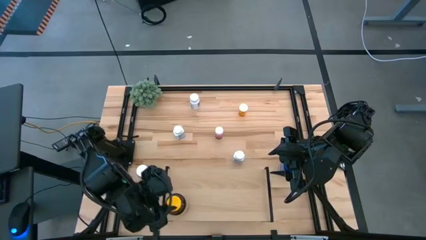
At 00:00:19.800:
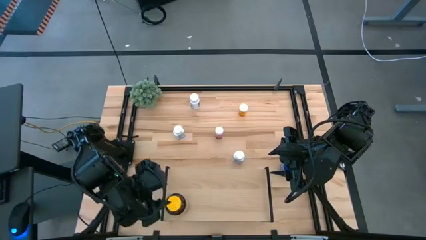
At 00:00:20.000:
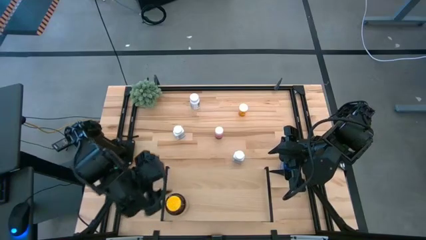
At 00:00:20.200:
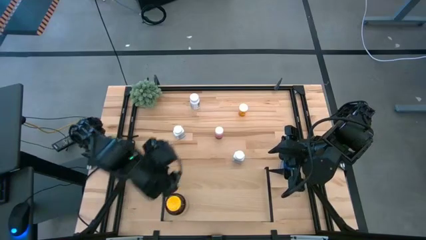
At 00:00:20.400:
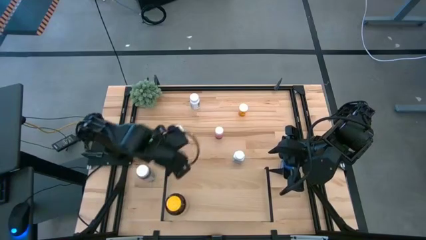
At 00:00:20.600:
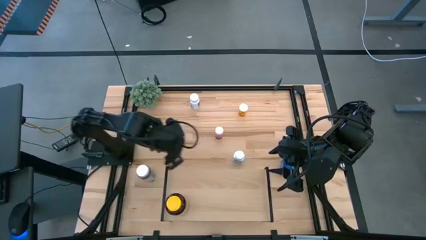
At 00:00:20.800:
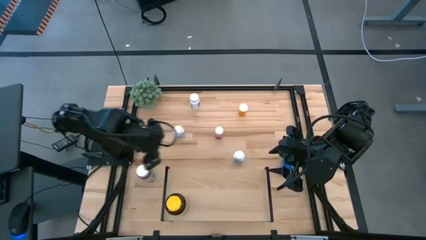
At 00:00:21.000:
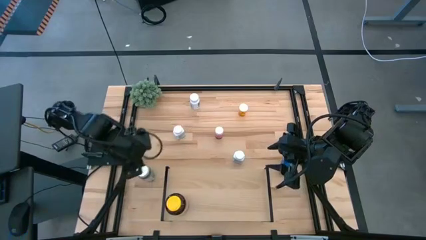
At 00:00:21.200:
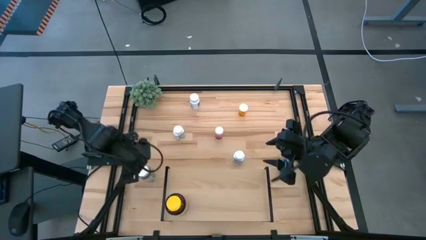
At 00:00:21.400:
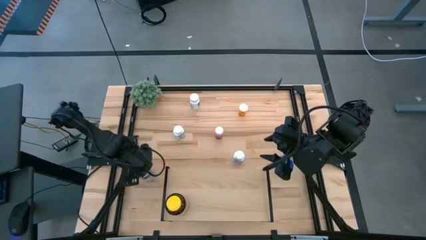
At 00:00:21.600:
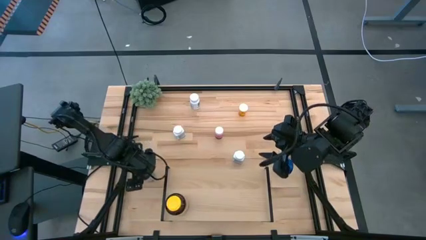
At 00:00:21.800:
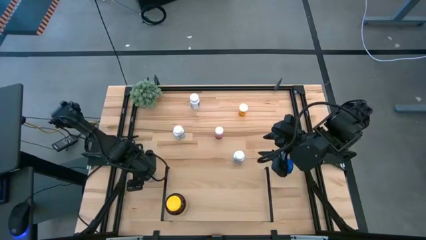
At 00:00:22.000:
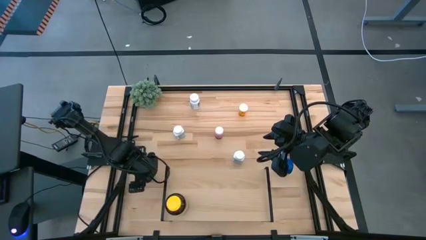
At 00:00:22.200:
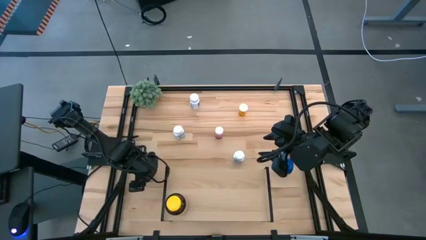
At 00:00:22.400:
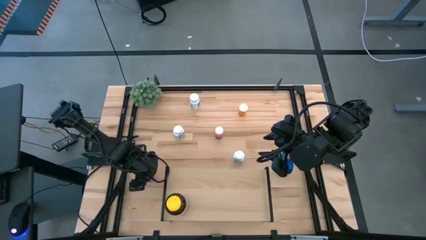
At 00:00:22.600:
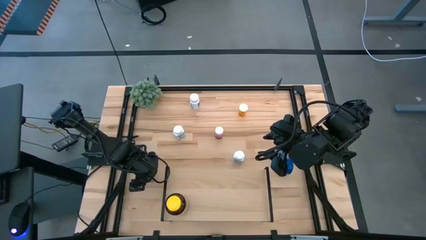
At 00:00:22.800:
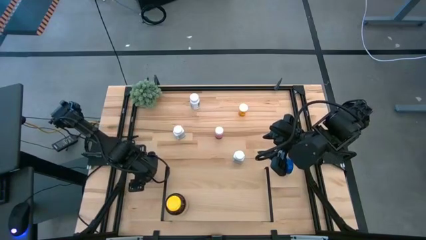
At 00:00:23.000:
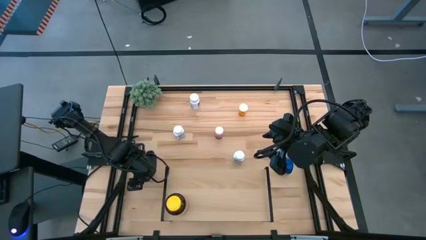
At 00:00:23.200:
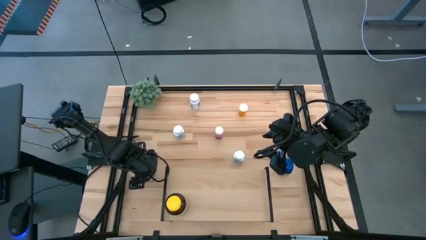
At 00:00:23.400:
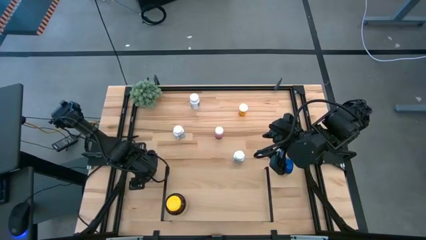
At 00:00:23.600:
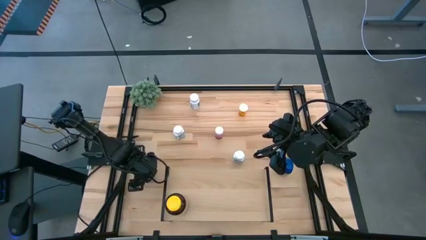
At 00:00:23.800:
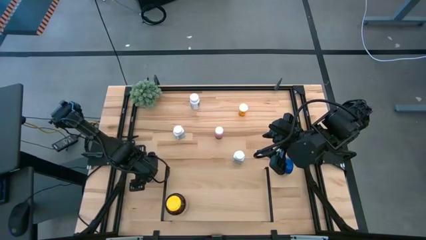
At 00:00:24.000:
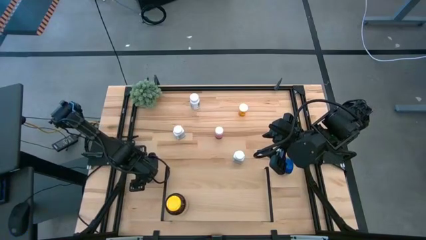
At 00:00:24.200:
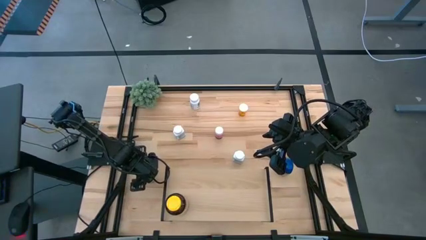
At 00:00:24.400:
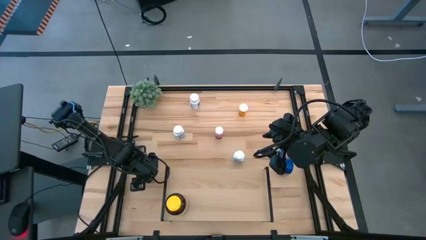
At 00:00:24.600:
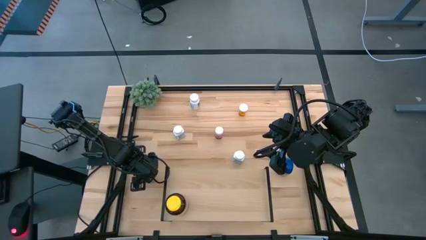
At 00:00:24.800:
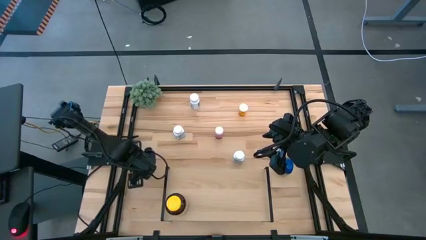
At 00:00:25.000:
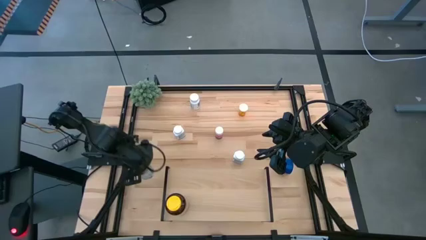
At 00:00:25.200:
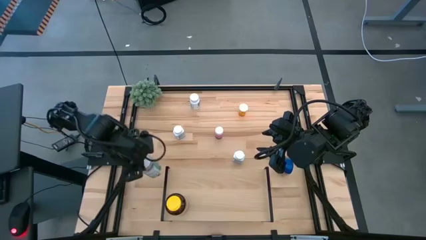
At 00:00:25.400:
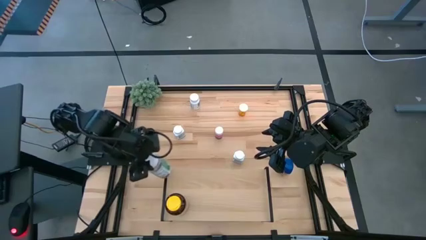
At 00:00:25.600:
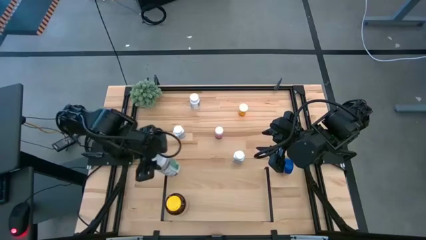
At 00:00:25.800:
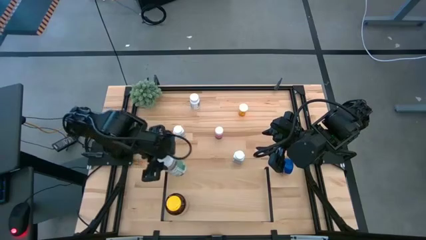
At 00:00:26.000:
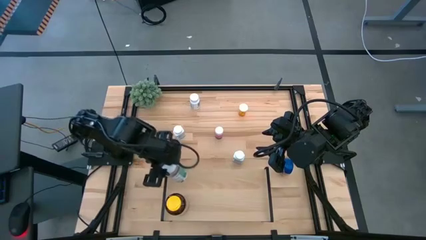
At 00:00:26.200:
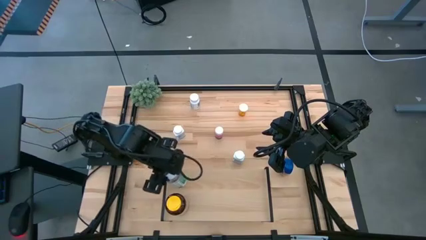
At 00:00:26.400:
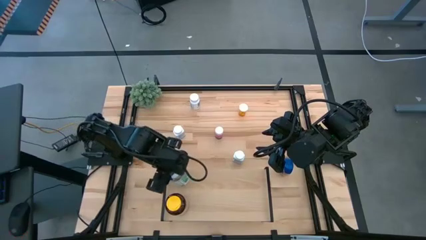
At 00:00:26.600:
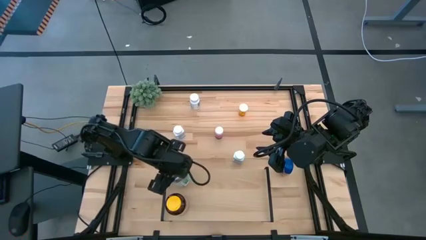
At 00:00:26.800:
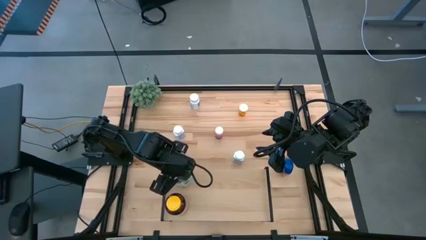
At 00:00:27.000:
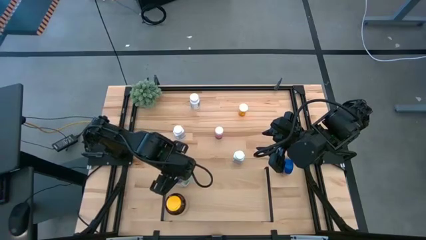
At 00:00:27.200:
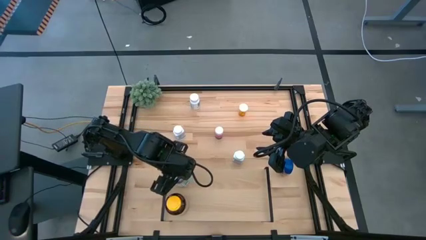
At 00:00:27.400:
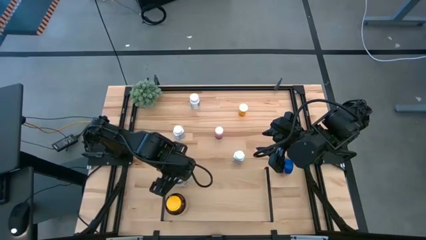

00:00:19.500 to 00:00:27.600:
Task: Pick and place medicine bottles onto shelf by color
Put the green pill bottle on the shelf

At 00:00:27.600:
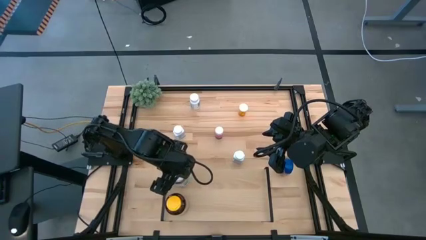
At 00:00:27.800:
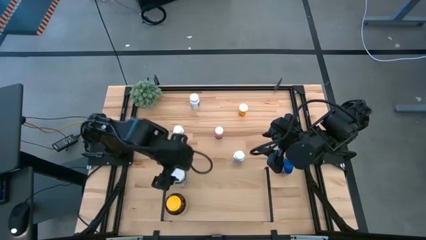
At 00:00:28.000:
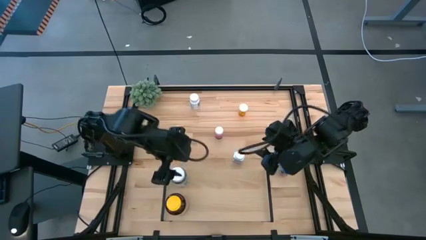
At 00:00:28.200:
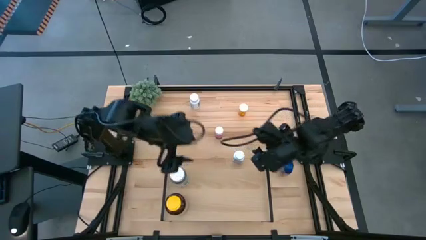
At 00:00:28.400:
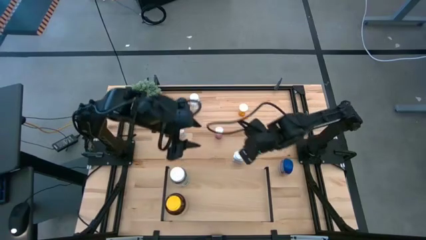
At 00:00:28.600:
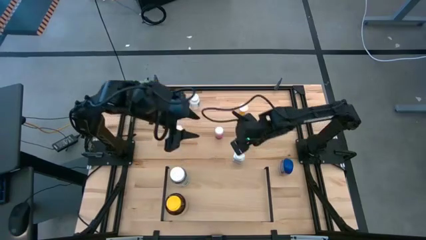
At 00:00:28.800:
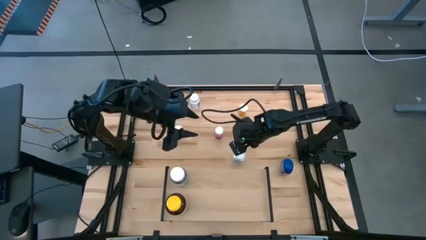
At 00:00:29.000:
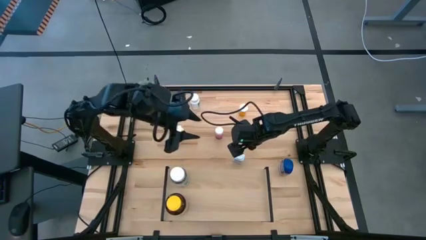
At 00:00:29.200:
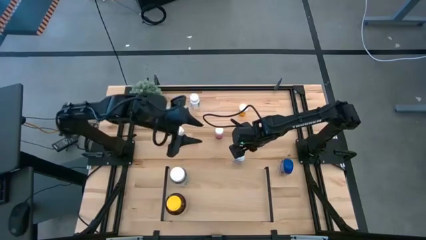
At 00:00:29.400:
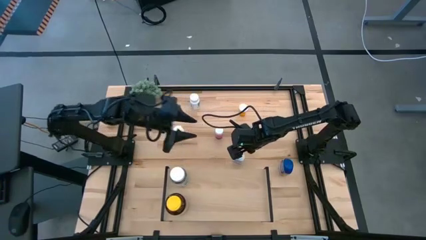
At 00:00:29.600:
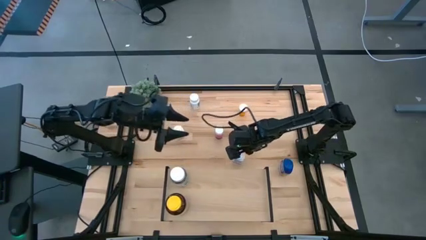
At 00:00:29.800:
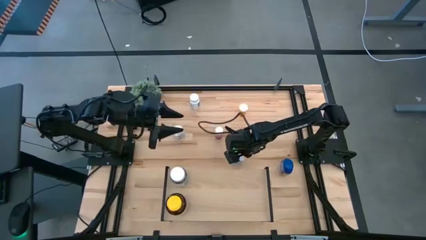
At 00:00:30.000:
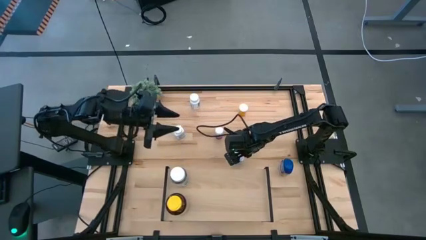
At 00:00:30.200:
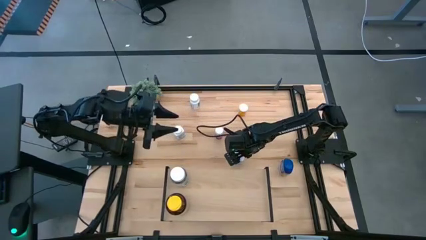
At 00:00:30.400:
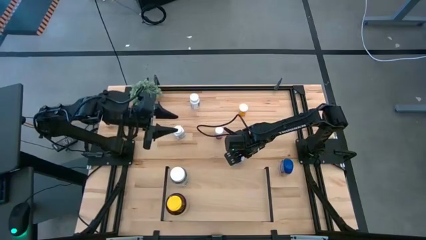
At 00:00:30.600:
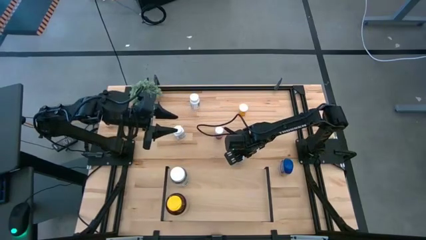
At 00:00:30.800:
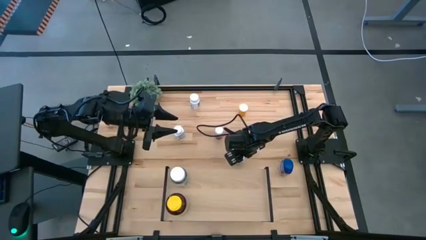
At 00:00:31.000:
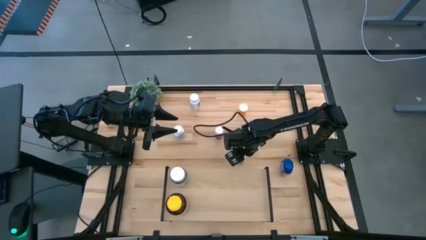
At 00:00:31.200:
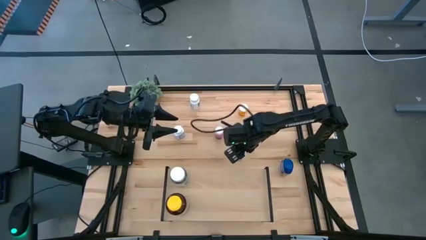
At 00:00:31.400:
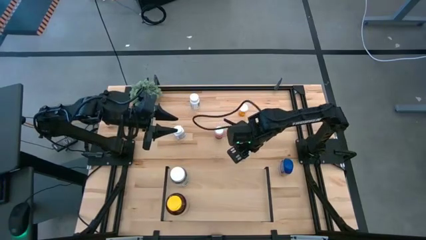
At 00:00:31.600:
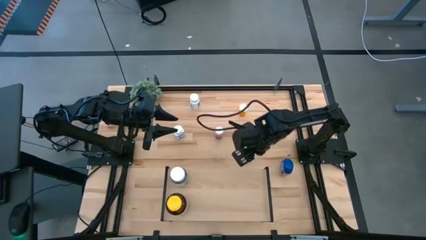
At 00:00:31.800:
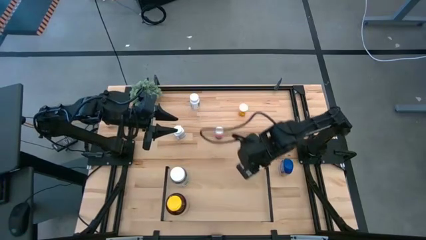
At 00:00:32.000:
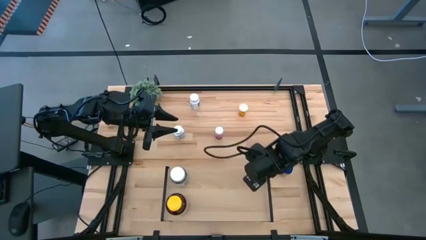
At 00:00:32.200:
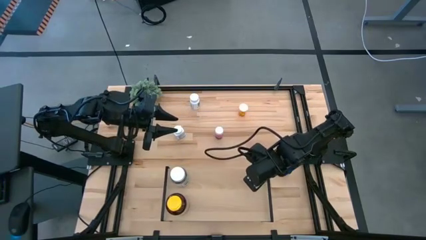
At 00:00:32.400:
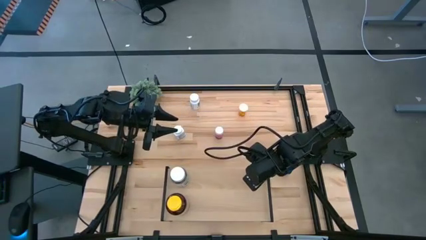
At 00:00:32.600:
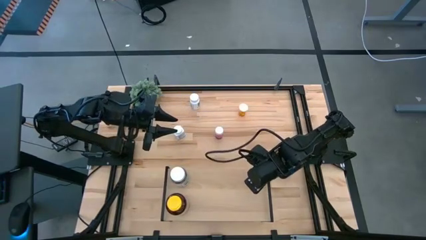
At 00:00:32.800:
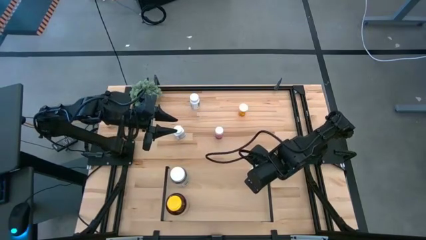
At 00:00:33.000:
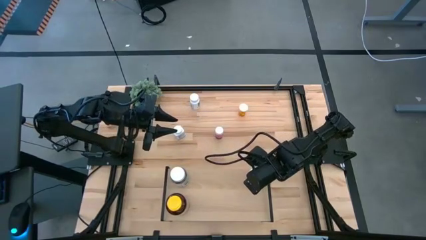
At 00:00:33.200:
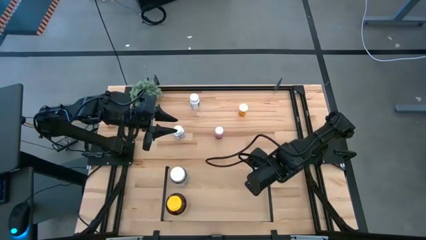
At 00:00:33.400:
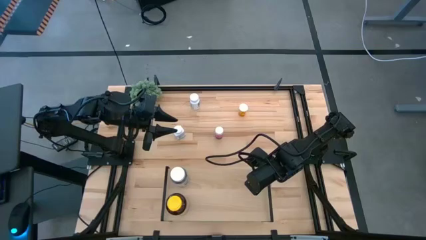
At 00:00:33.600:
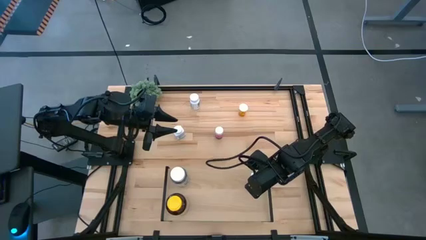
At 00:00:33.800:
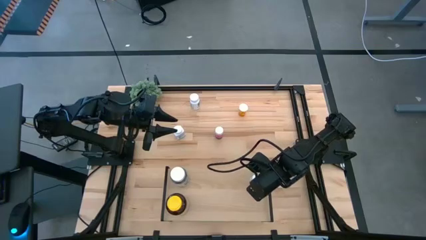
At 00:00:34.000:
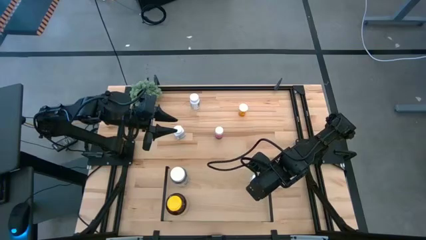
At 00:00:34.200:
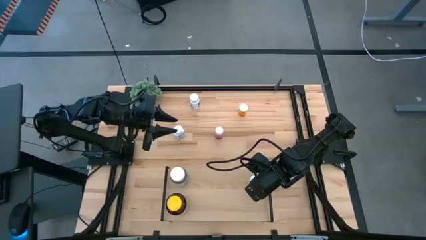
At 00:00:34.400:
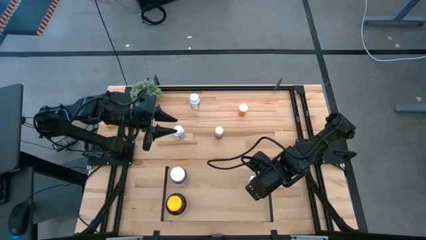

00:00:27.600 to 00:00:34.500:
Put the bottom white blue pill bottle on the shelf
